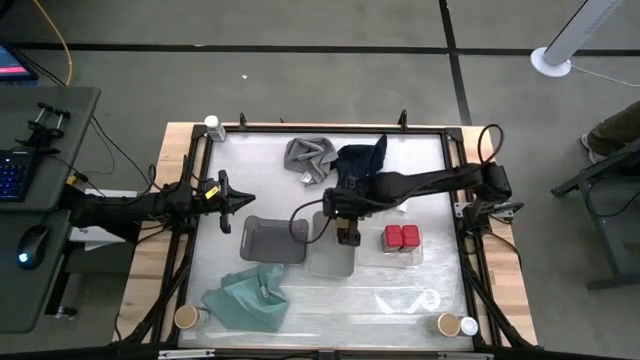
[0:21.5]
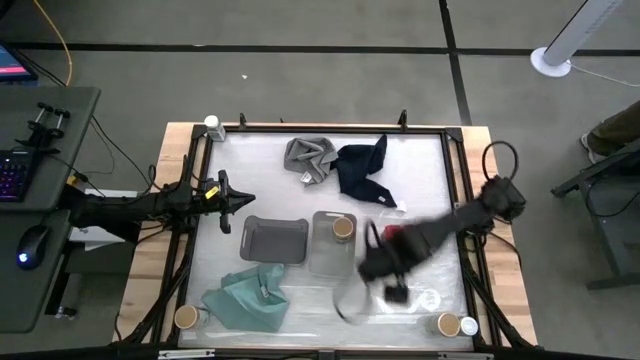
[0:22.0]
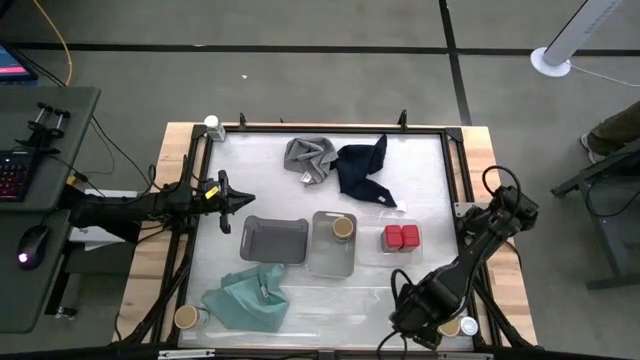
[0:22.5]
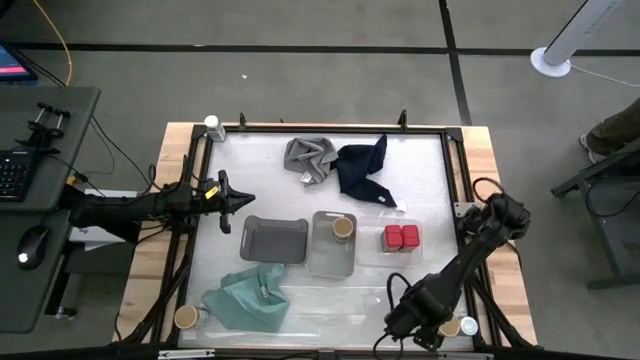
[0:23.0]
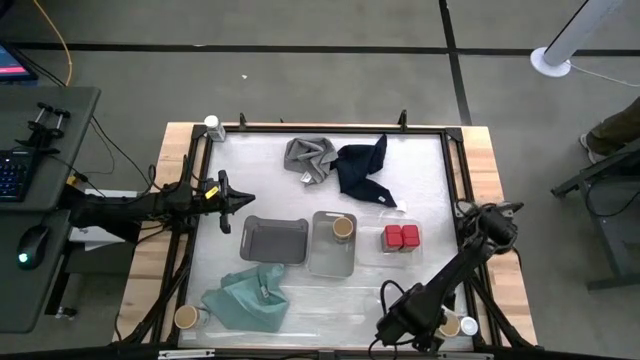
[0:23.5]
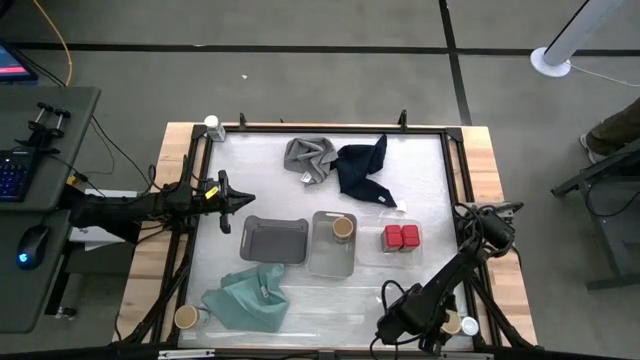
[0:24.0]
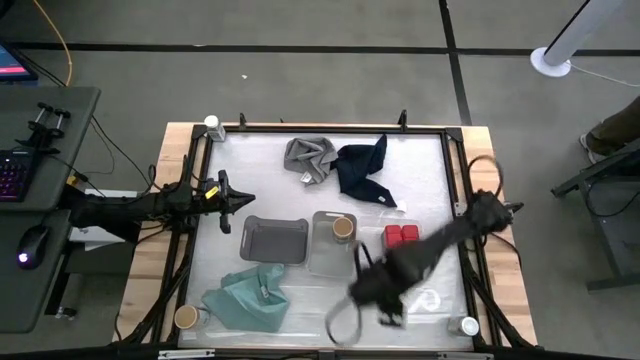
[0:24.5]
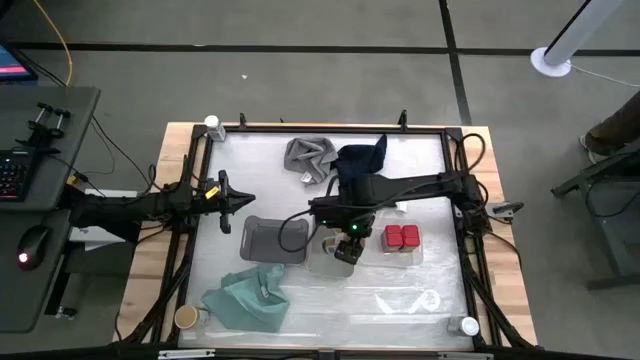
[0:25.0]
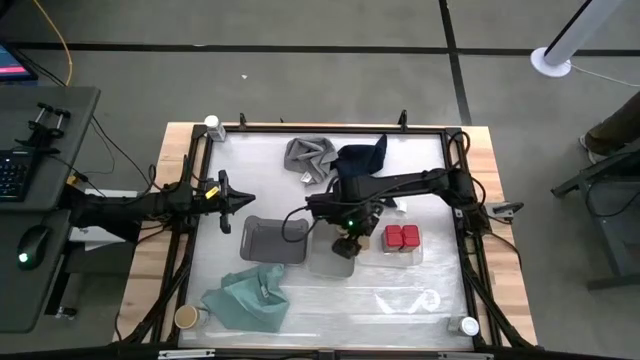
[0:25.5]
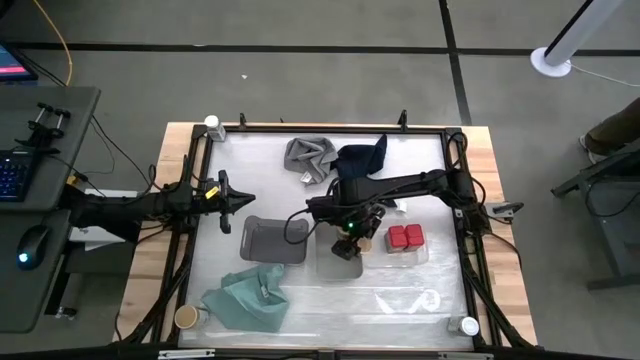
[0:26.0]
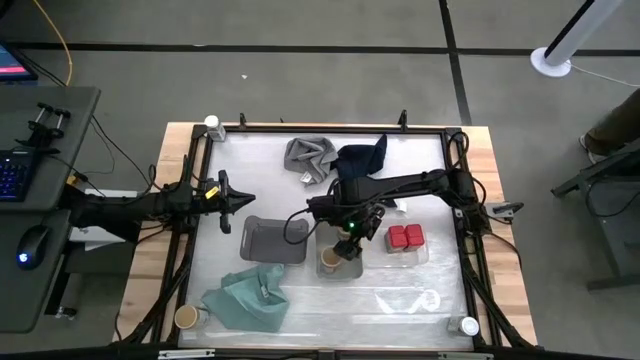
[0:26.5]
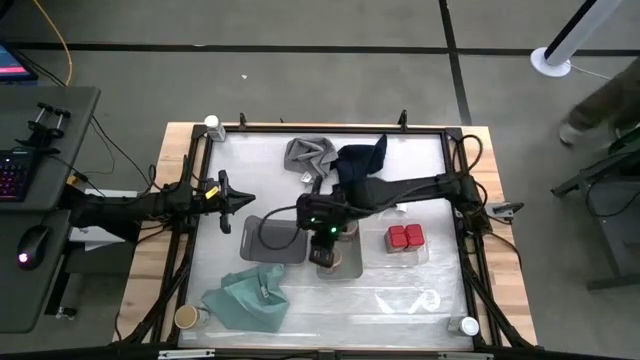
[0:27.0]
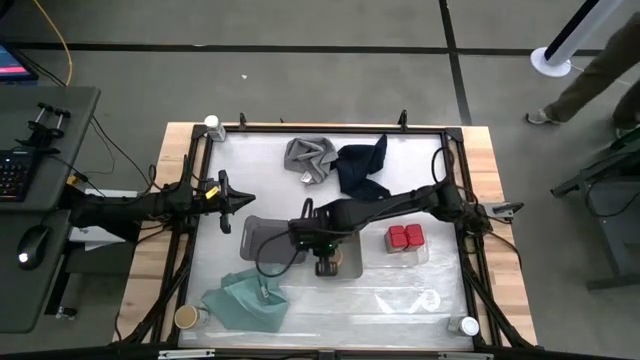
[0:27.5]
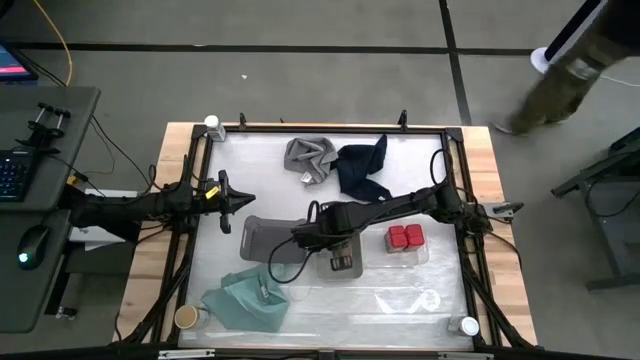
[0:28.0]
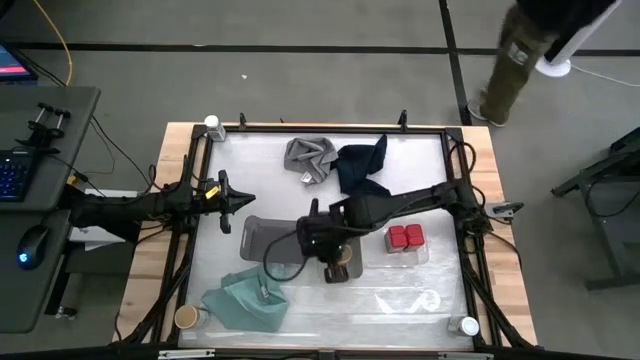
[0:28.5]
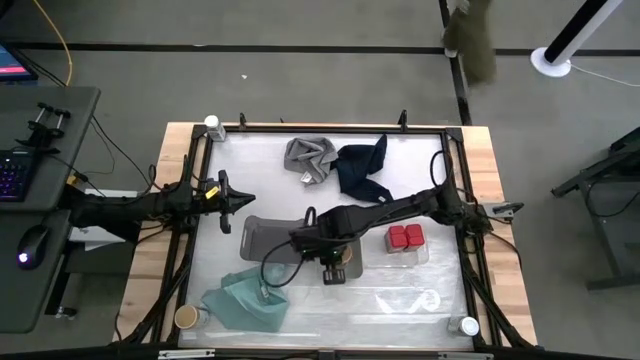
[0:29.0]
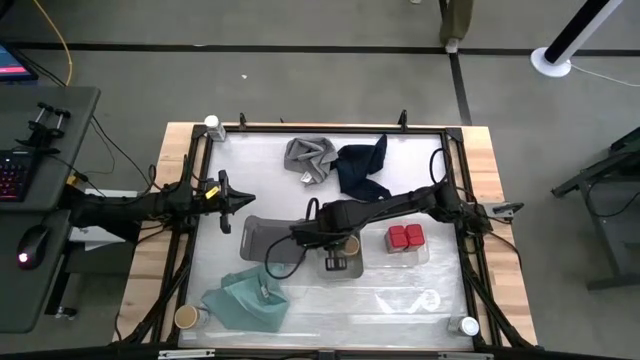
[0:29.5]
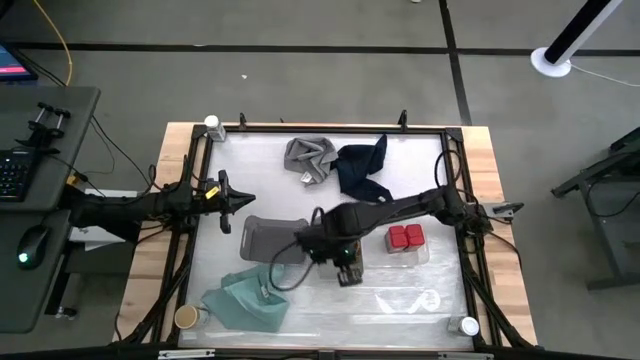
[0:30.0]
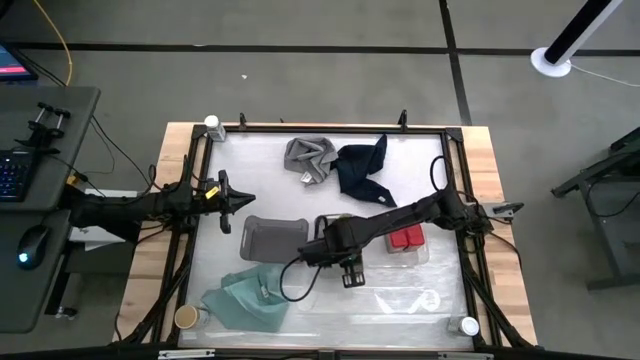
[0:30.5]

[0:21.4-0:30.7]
Task: Sort spices by type
Put the right brown spice bottle into the gray bin

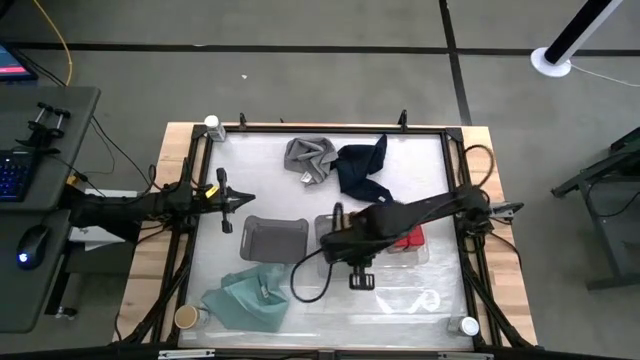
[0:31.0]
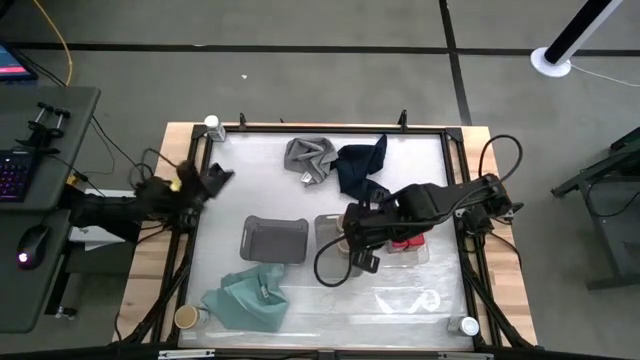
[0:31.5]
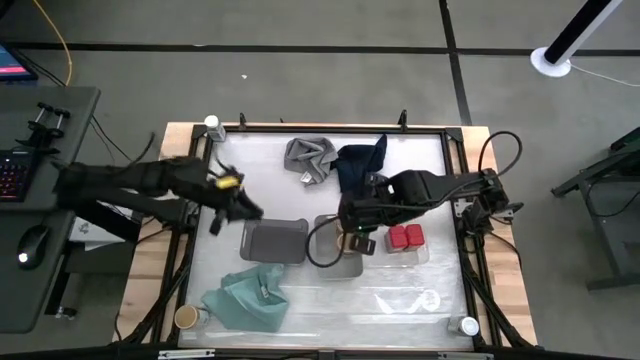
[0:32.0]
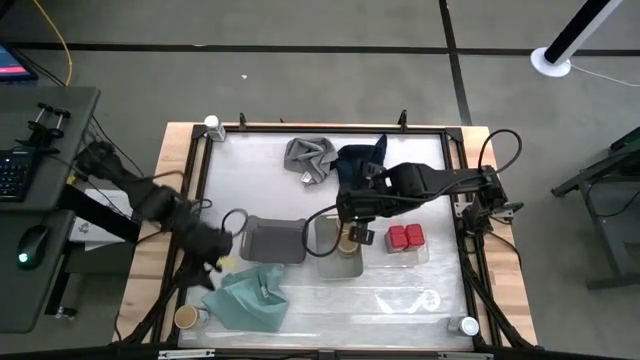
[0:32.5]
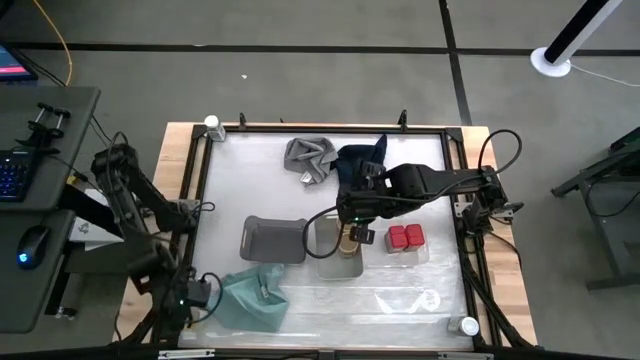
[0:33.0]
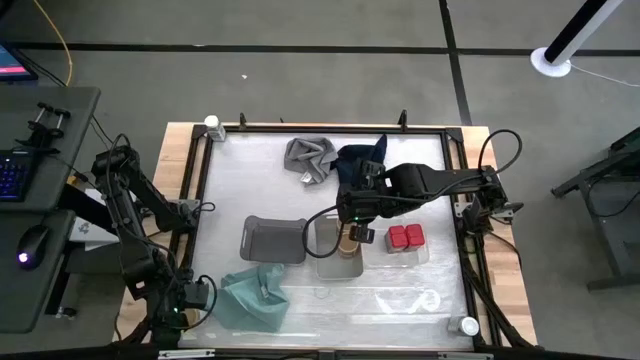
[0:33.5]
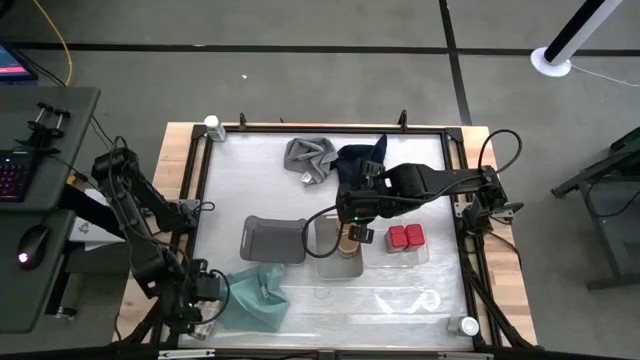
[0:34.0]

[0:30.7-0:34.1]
Put the brown spice bottle into the gray bin

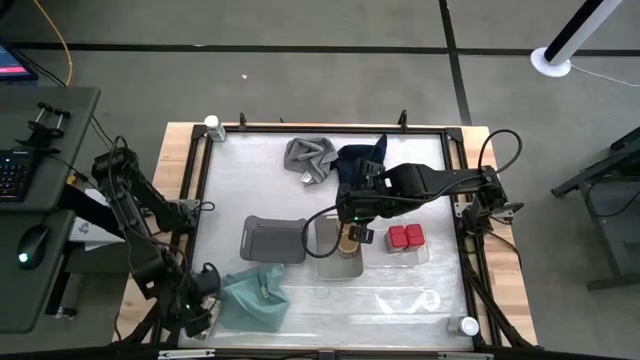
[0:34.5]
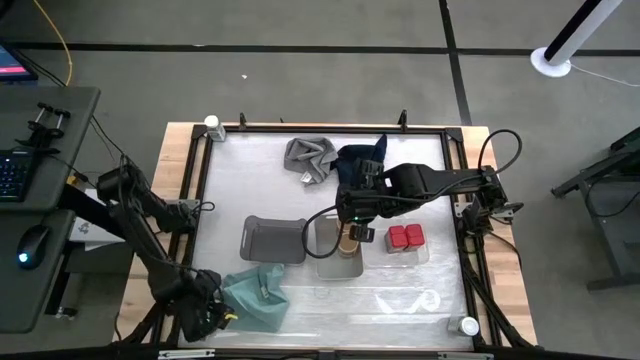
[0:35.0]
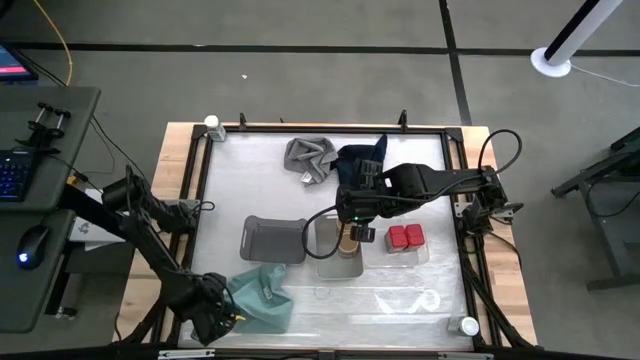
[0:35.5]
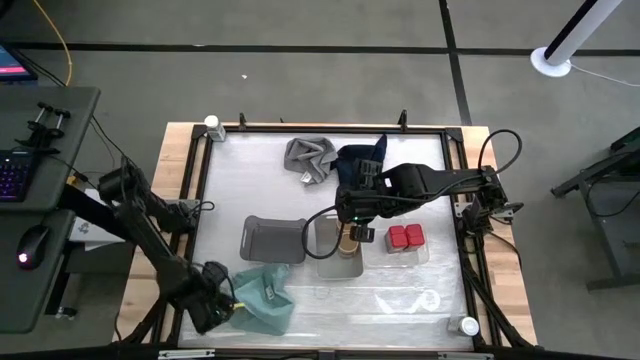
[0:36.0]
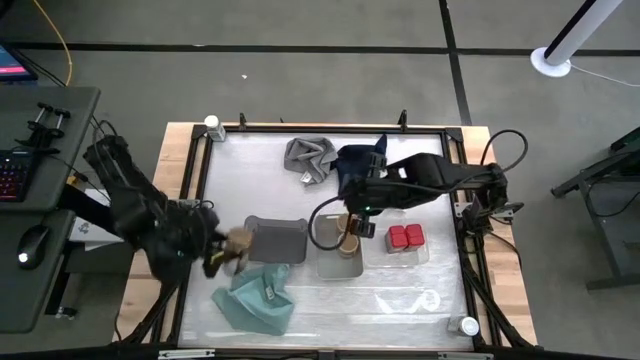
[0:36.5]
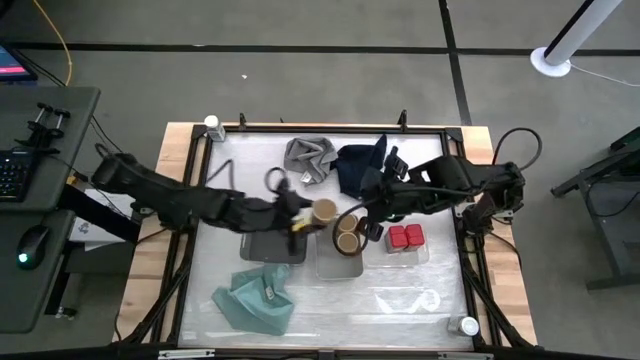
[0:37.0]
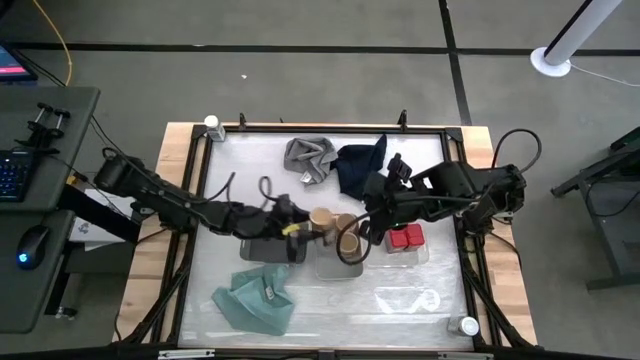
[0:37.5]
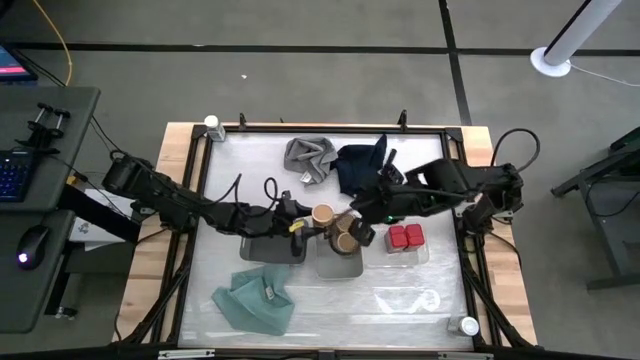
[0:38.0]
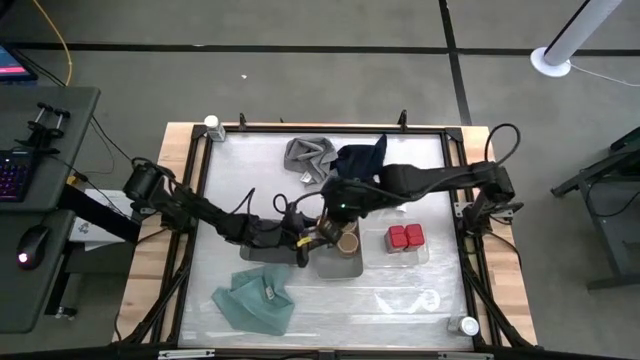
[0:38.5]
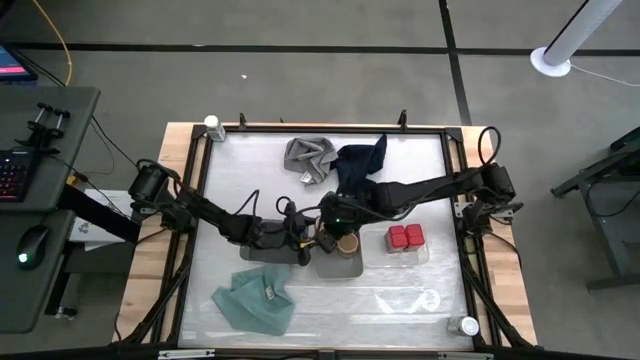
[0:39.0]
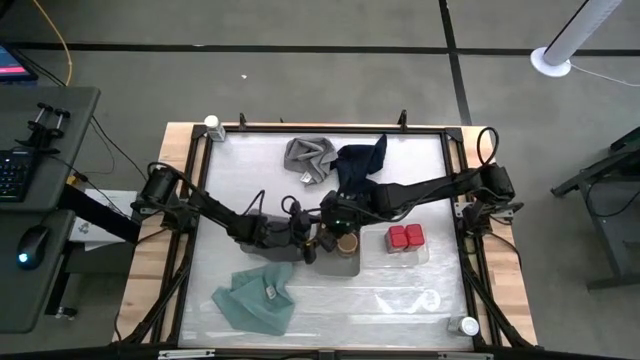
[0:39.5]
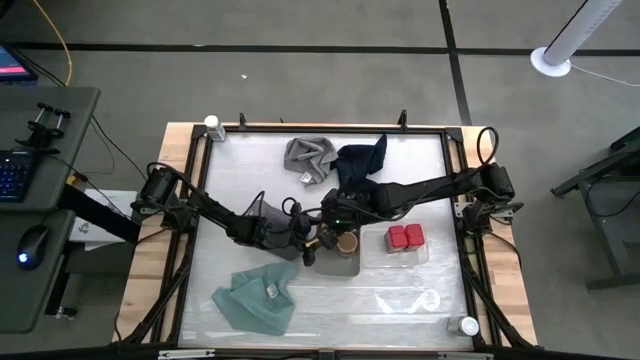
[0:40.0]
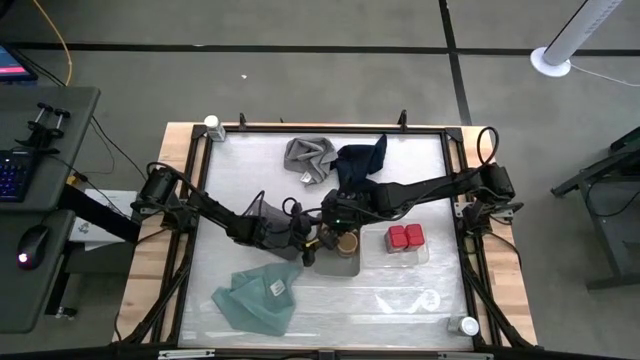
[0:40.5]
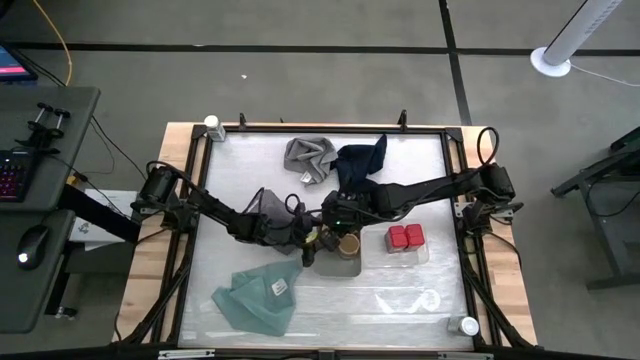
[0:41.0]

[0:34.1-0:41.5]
Put the brown spice bottle into the gray bin

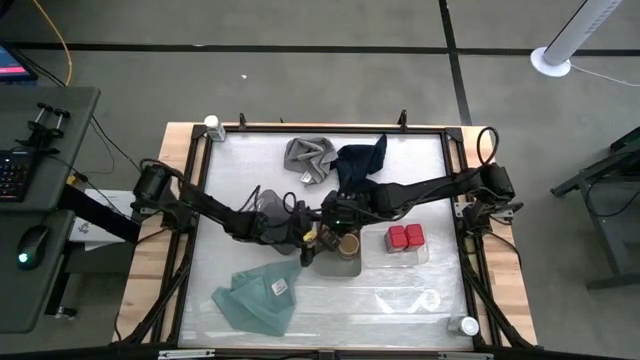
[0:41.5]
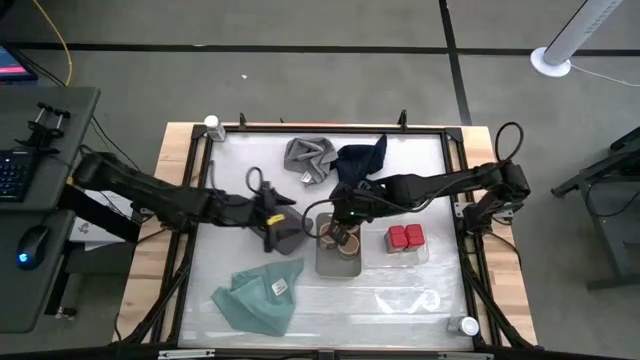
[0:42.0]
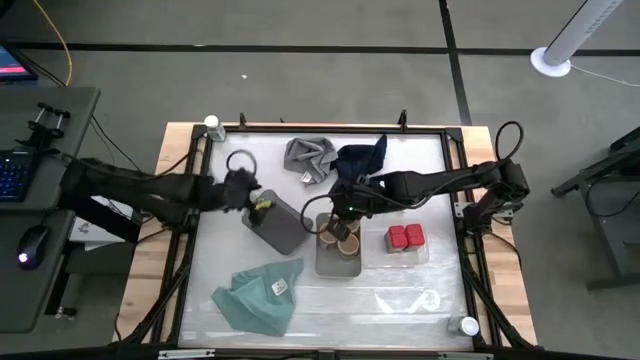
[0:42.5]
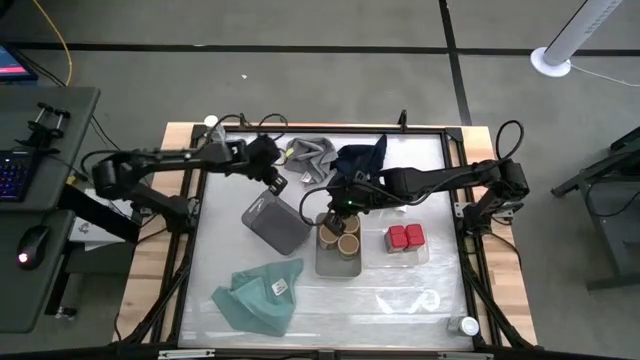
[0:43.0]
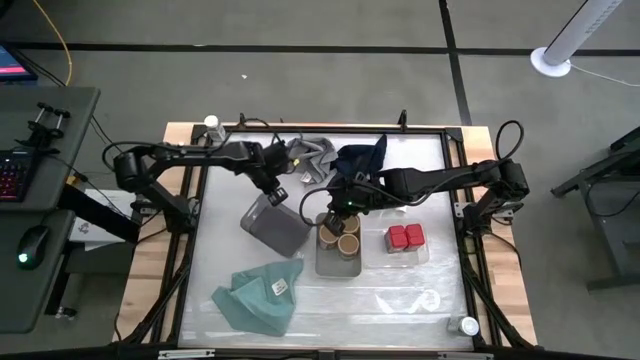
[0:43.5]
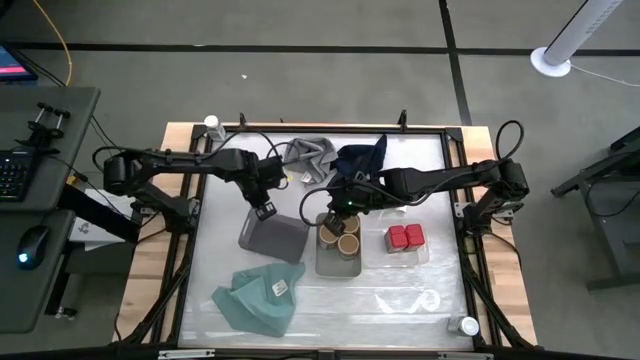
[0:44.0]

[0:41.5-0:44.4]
Adjust the black bin
